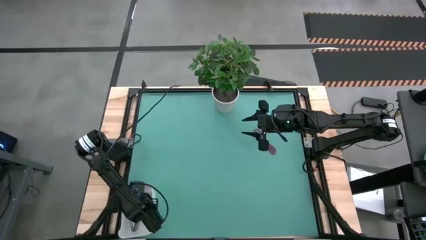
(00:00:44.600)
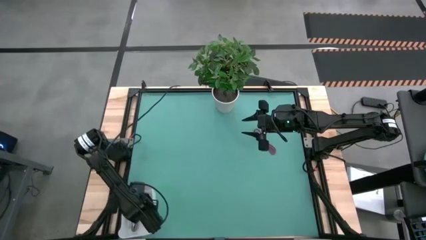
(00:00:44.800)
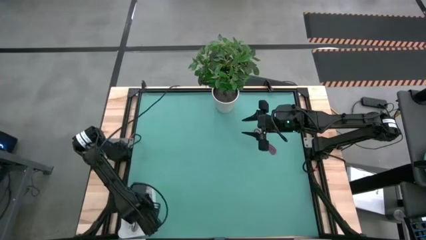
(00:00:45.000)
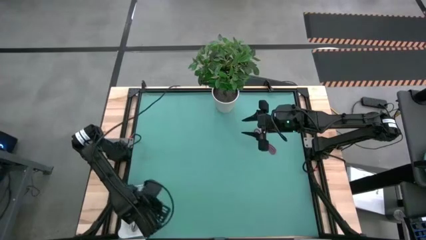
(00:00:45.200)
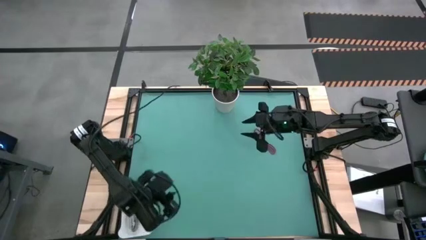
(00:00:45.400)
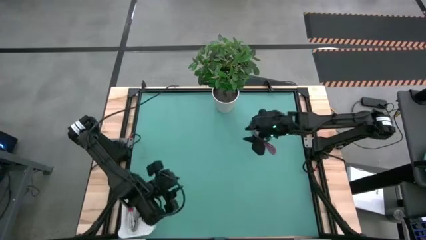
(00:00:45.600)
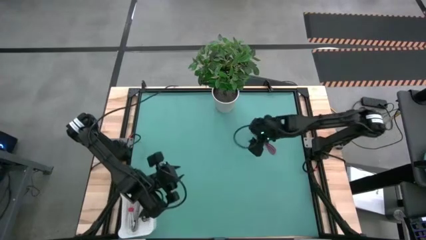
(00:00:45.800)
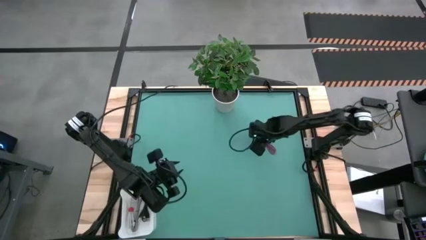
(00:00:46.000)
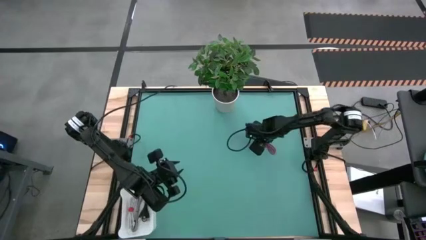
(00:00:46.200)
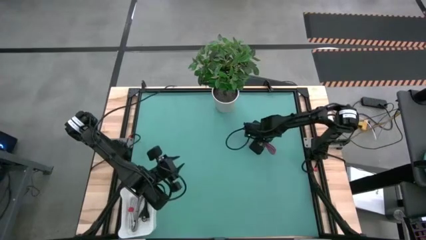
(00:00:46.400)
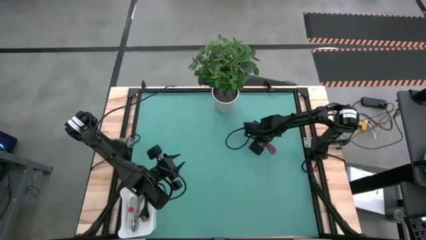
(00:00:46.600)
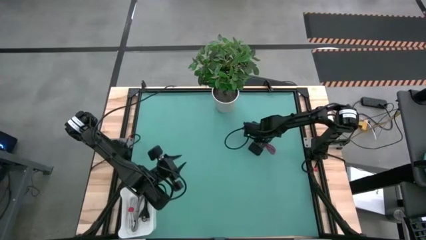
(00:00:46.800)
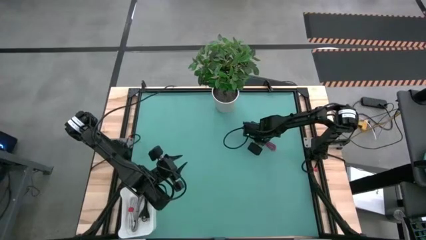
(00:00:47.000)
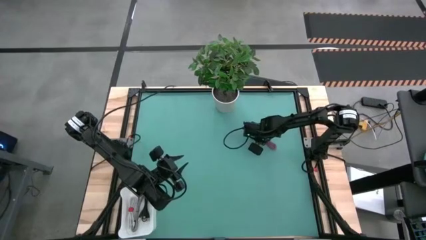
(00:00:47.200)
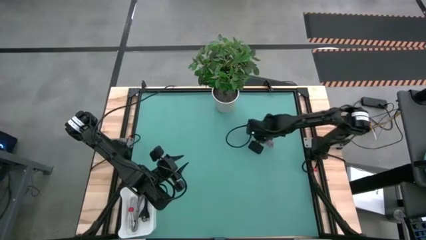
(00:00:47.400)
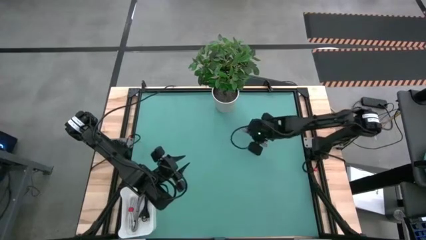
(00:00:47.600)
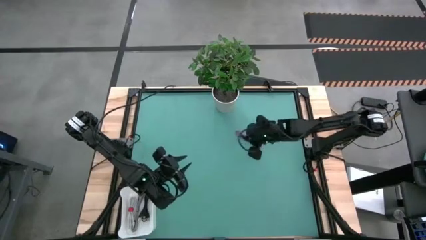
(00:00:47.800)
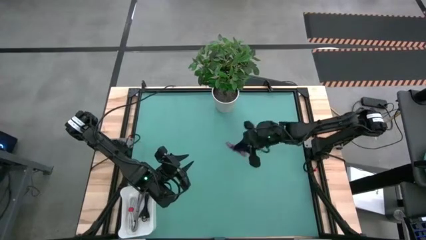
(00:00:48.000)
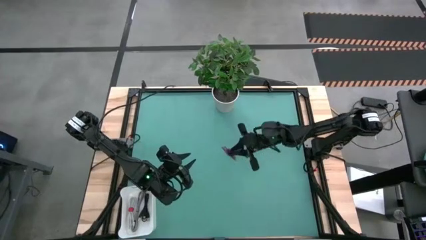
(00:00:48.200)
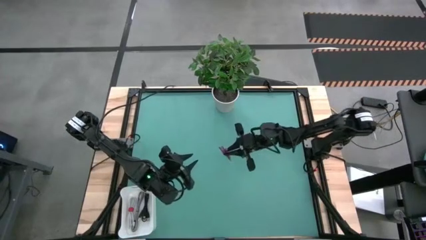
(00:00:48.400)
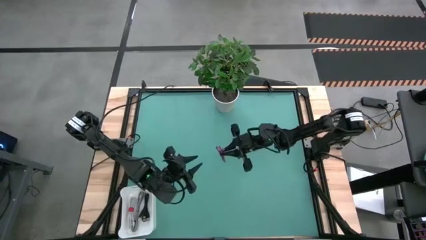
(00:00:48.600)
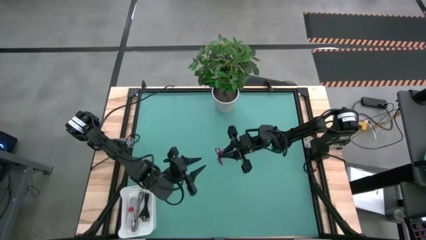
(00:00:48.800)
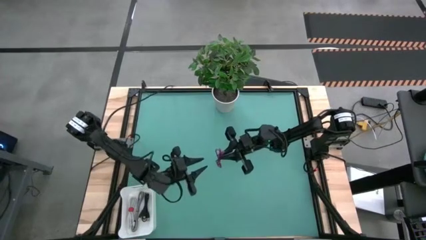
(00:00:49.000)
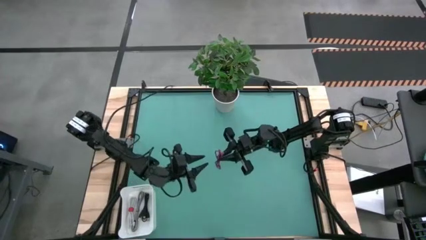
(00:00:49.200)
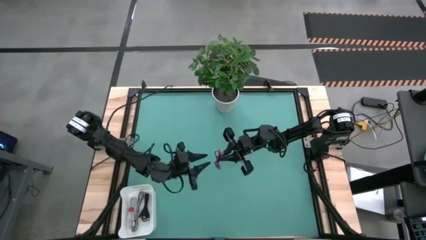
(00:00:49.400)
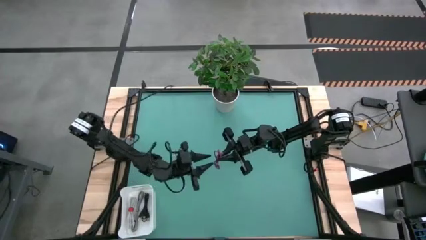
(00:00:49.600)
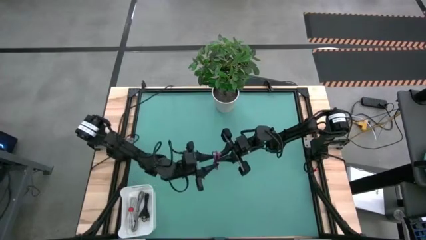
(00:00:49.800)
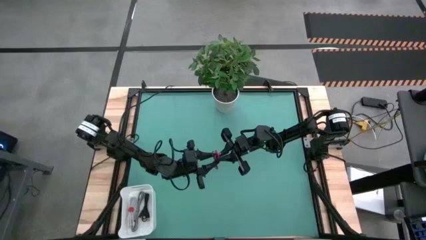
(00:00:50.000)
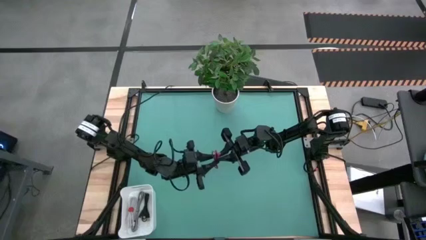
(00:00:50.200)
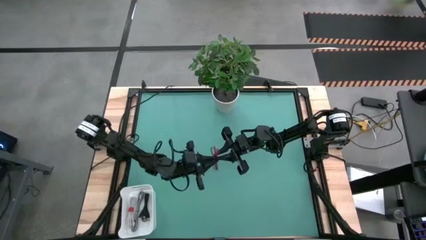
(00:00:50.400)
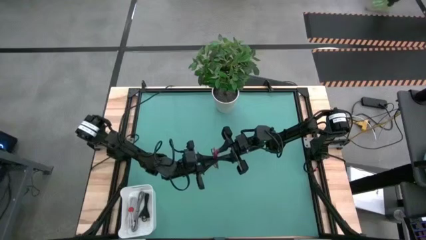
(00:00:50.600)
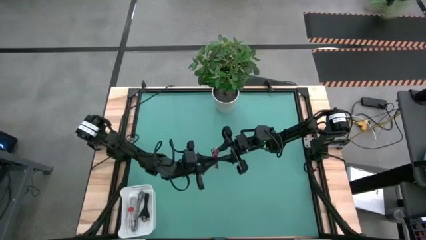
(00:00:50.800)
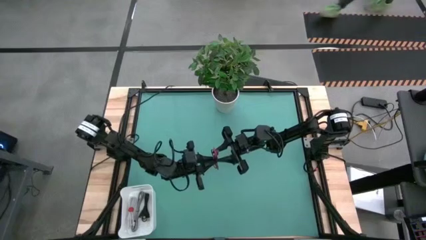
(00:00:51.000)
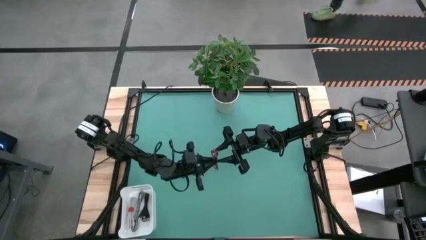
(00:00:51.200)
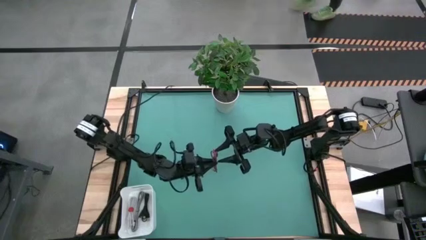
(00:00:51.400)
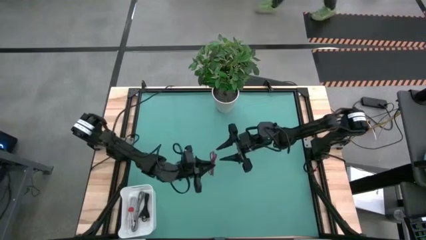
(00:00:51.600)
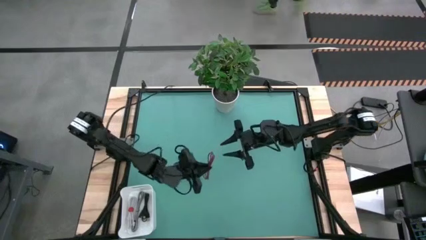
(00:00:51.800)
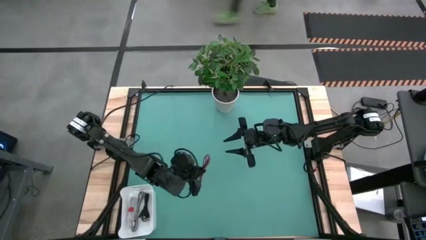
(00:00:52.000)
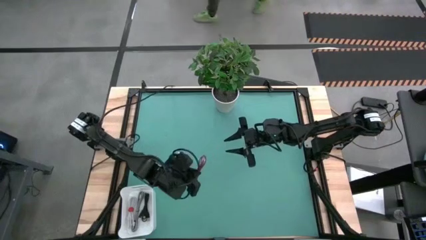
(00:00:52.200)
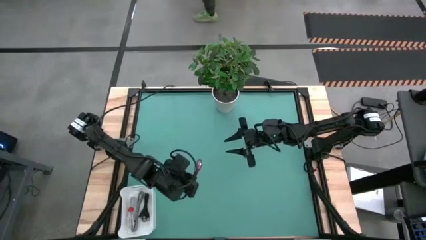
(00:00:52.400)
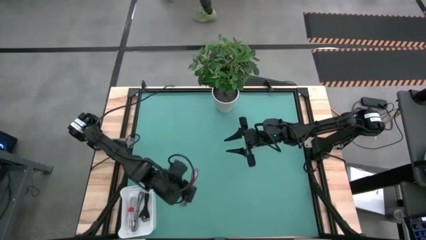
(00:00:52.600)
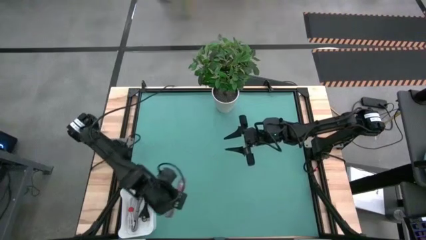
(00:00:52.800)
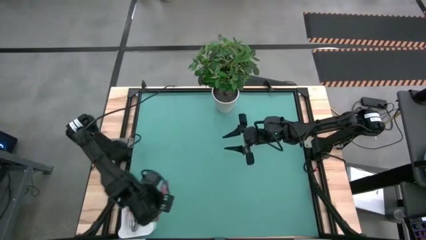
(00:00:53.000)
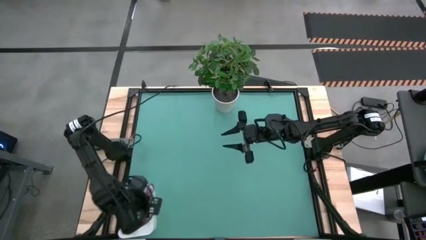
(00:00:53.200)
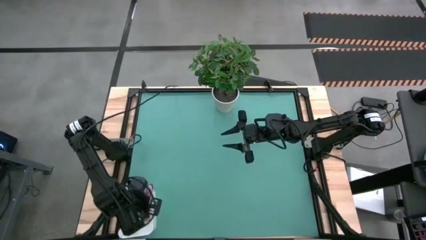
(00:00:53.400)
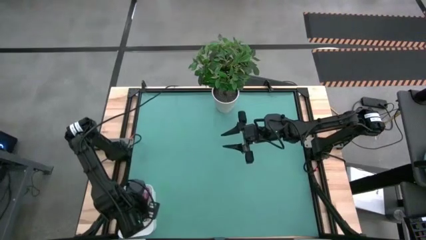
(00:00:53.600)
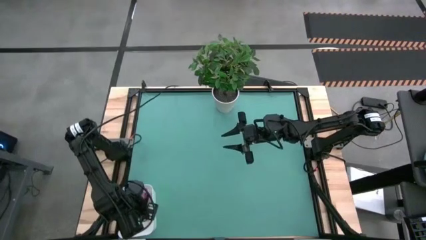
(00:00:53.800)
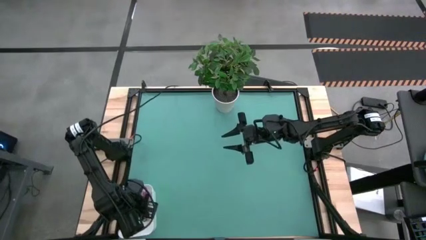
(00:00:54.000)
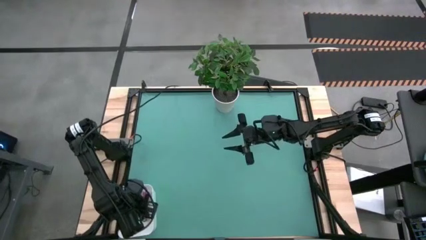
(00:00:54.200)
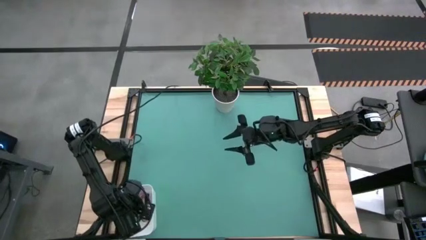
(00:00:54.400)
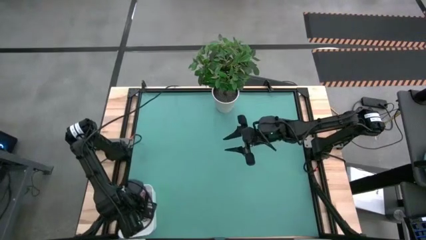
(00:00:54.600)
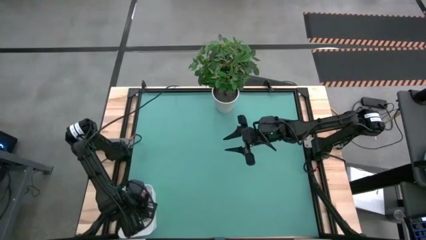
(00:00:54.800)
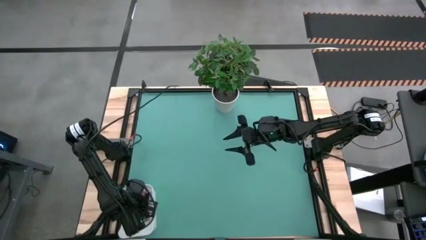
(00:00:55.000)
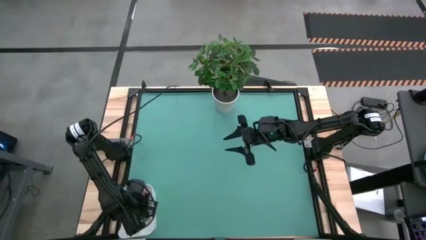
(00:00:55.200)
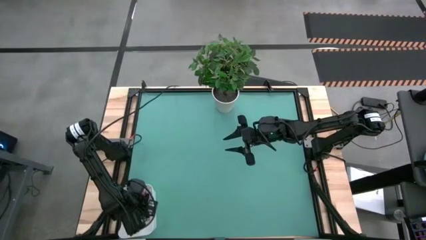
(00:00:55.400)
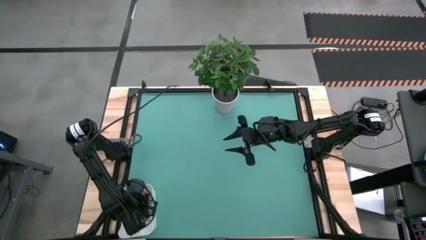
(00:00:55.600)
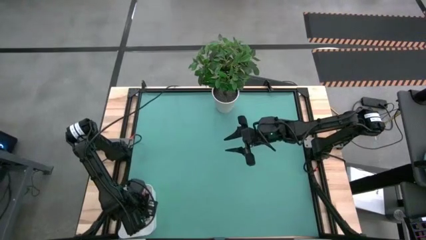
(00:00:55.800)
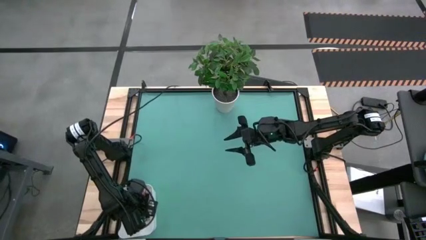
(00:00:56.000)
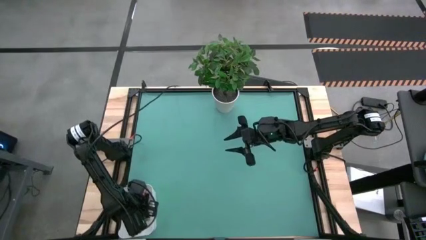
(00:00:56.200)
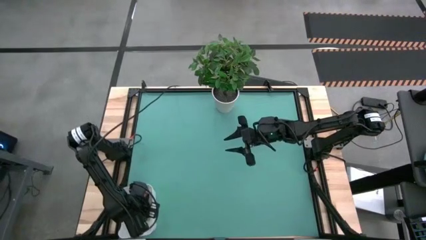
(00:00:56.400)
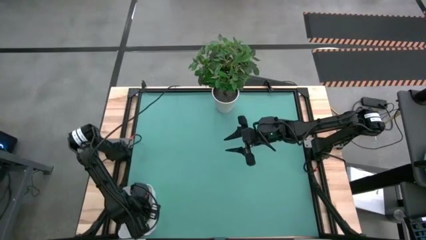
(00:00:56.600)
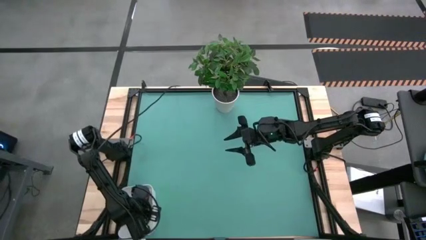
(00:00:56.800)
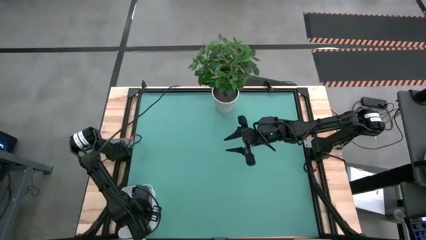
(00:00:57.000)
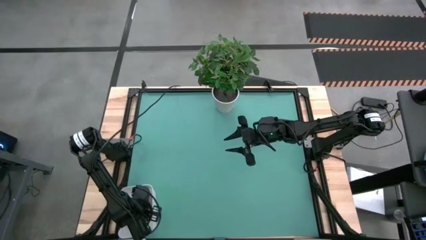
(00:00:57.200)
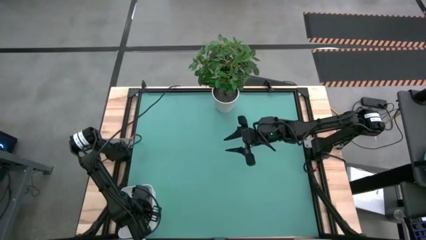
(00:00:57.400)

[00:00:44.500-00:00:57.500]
Task: Pick and place USB-C Cables
Put the black pink charger cable into the bin
